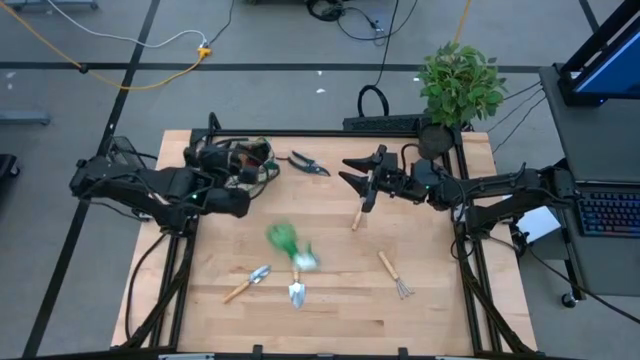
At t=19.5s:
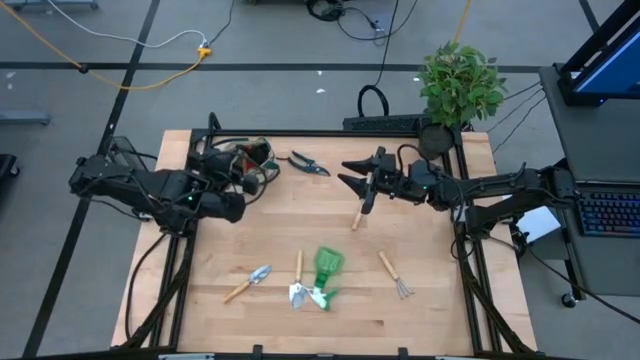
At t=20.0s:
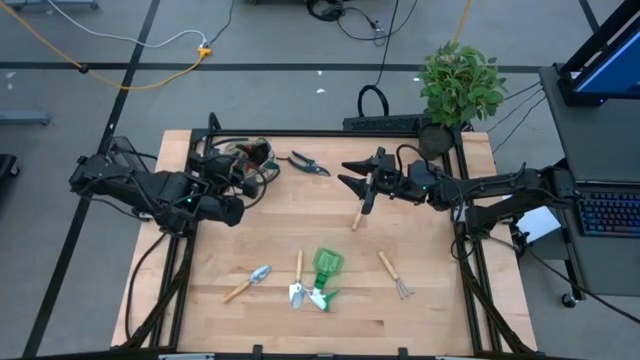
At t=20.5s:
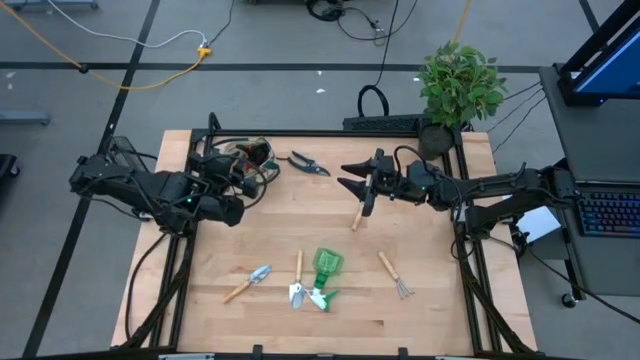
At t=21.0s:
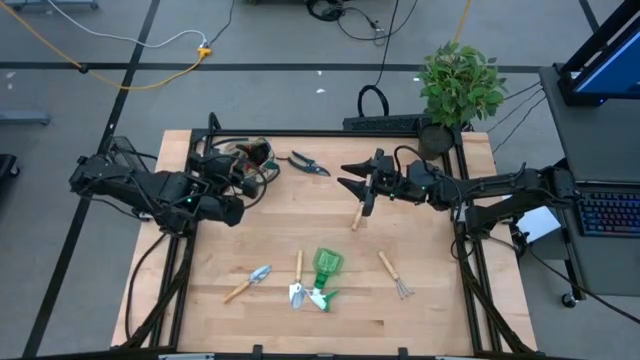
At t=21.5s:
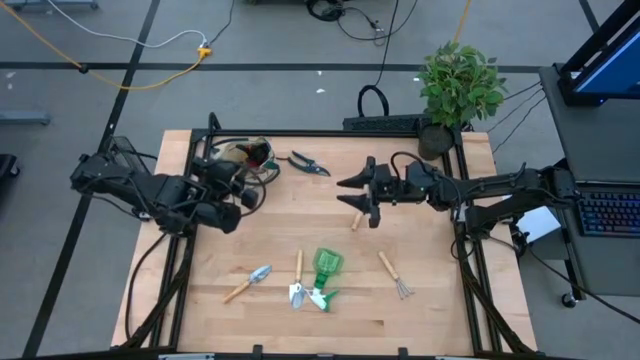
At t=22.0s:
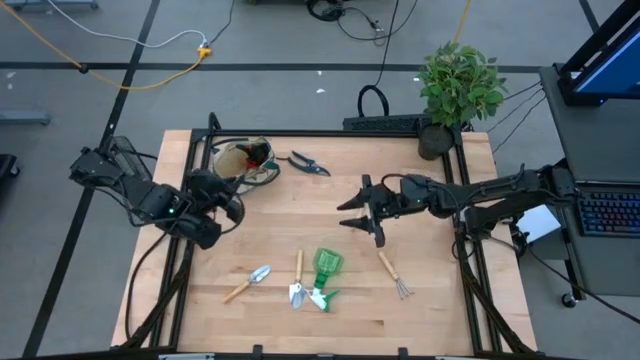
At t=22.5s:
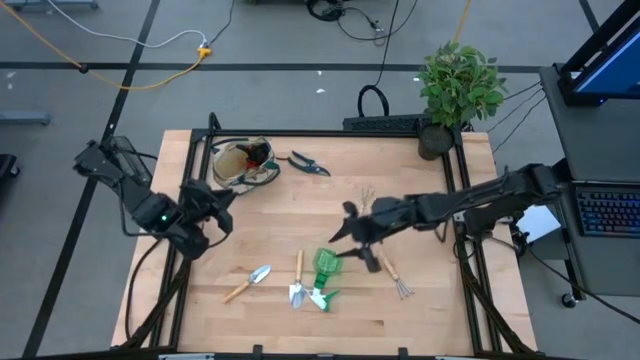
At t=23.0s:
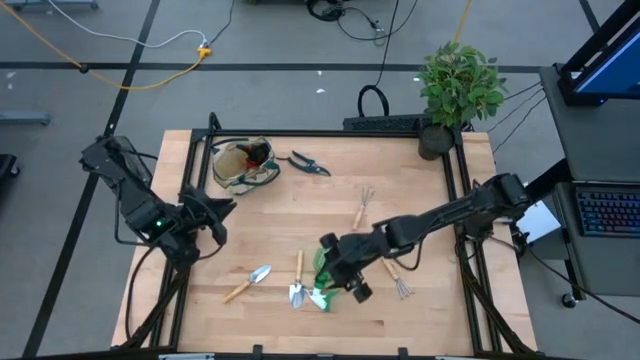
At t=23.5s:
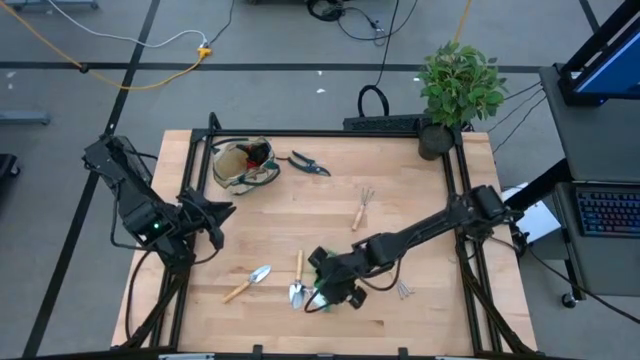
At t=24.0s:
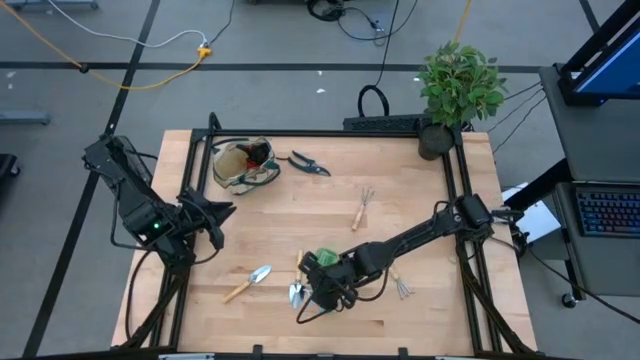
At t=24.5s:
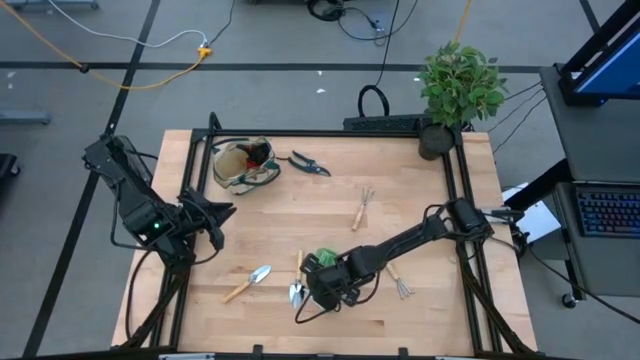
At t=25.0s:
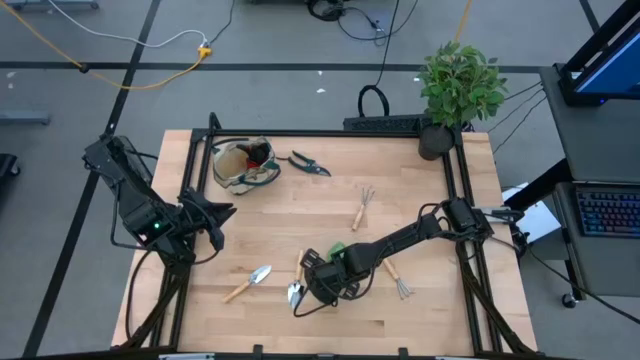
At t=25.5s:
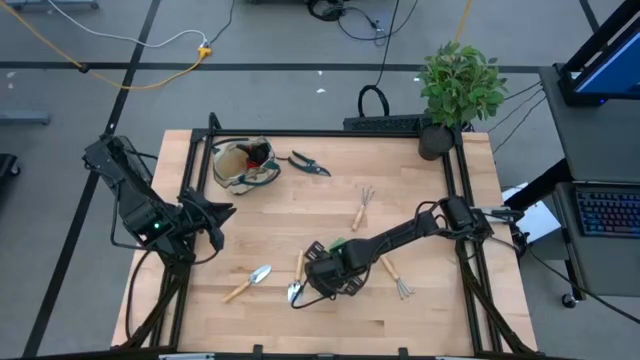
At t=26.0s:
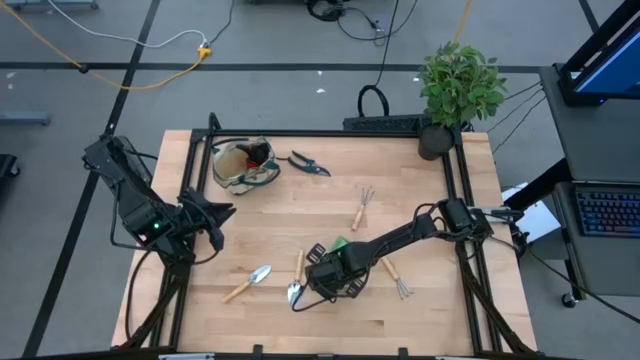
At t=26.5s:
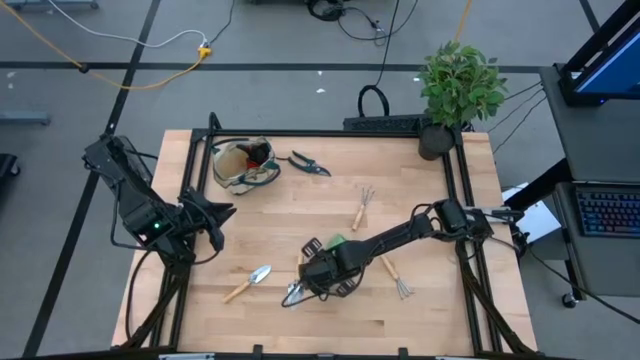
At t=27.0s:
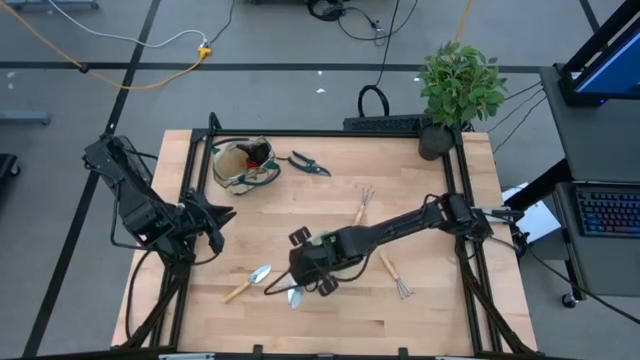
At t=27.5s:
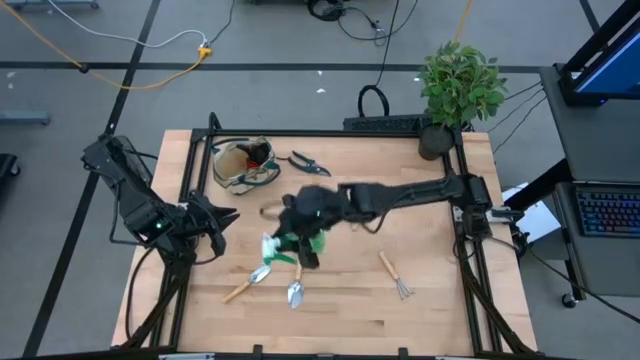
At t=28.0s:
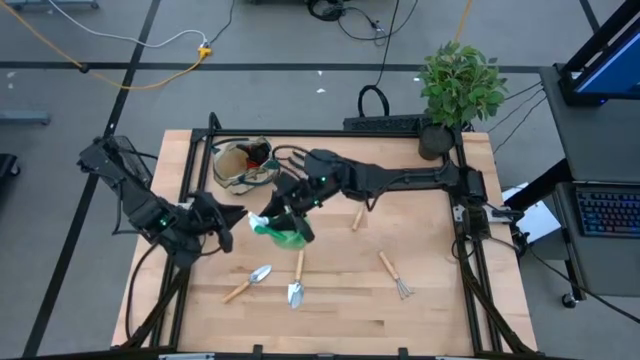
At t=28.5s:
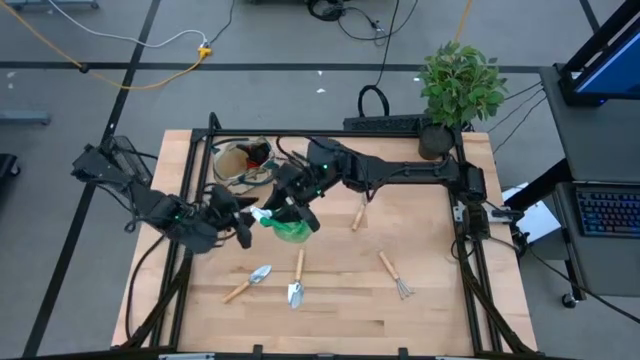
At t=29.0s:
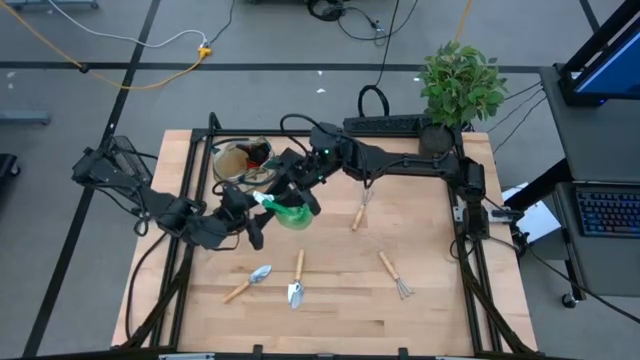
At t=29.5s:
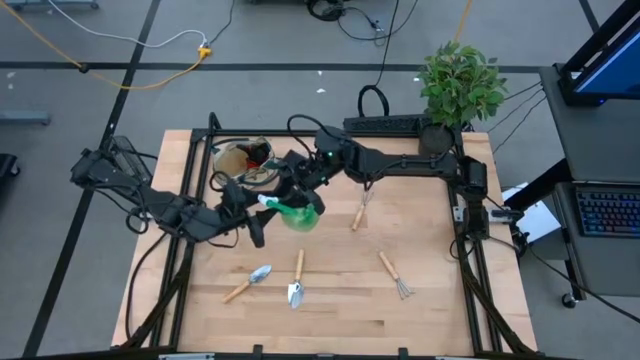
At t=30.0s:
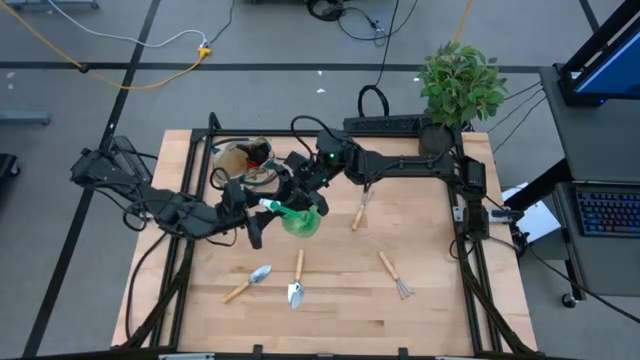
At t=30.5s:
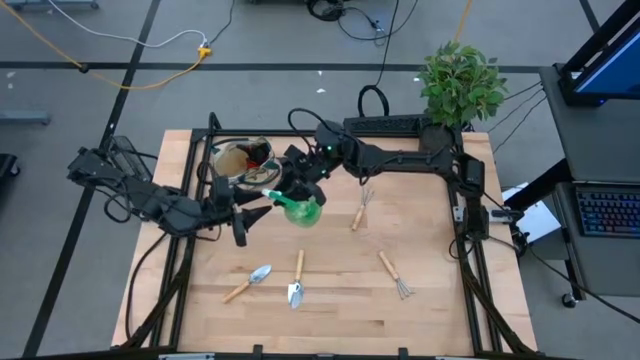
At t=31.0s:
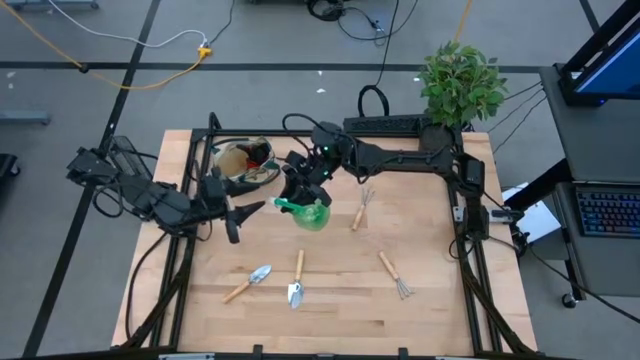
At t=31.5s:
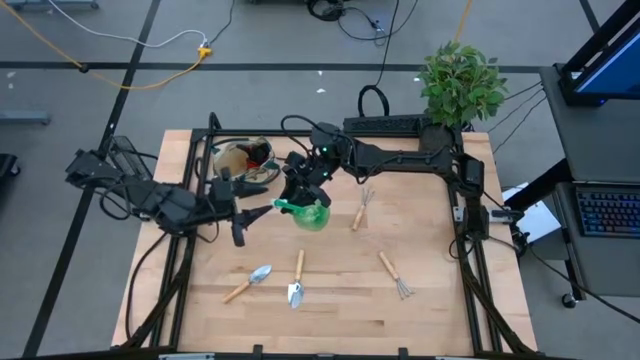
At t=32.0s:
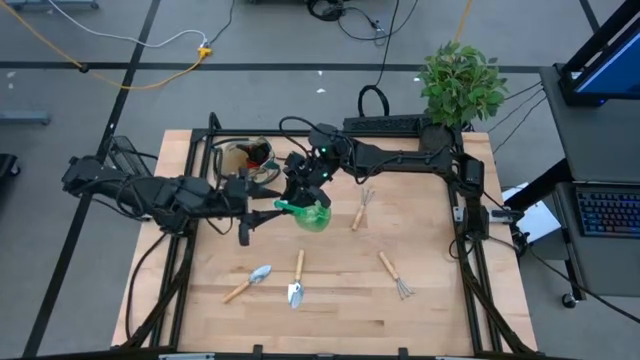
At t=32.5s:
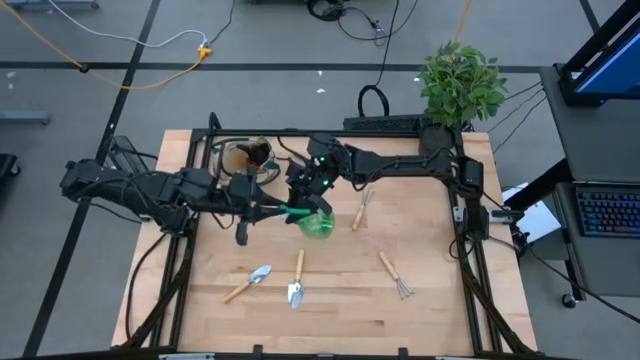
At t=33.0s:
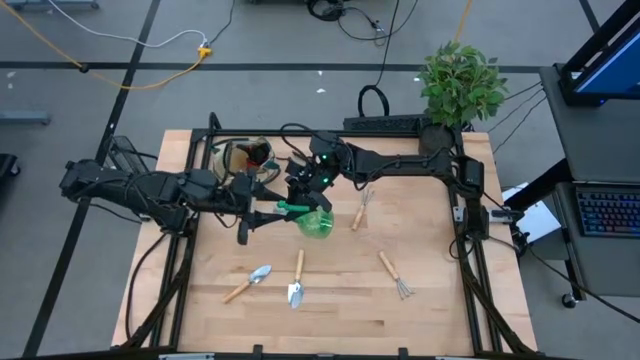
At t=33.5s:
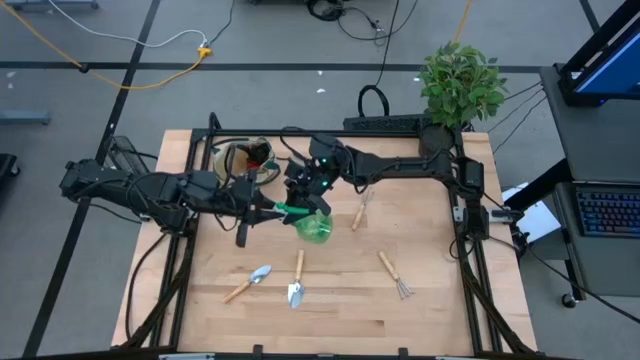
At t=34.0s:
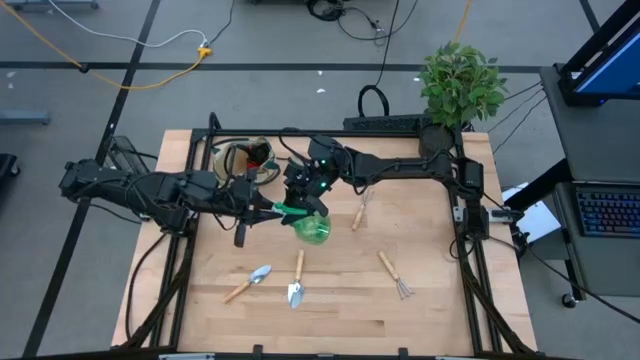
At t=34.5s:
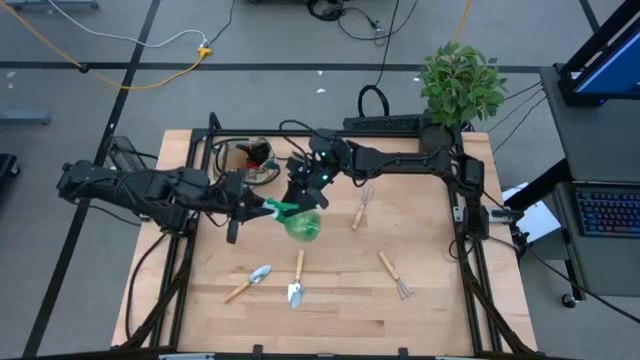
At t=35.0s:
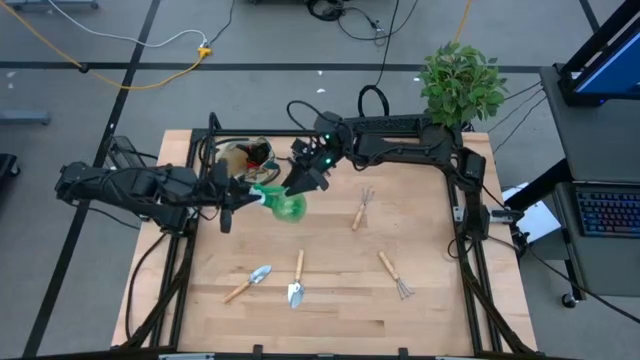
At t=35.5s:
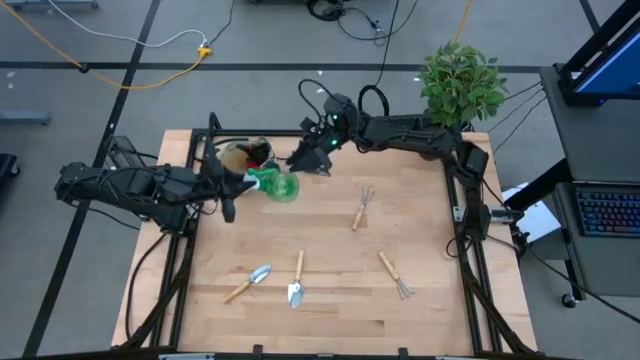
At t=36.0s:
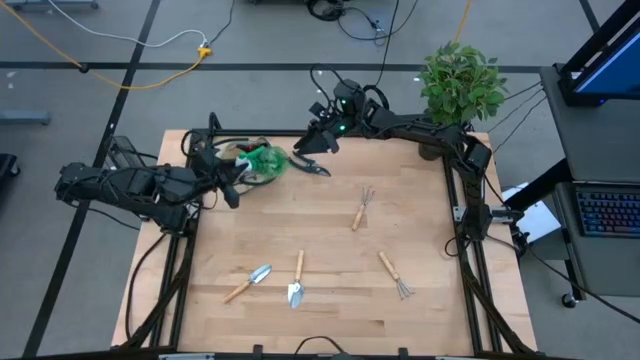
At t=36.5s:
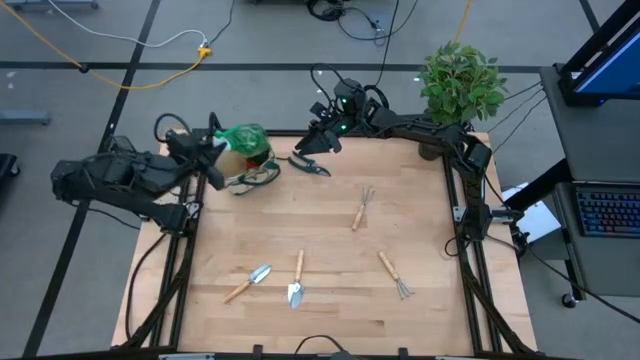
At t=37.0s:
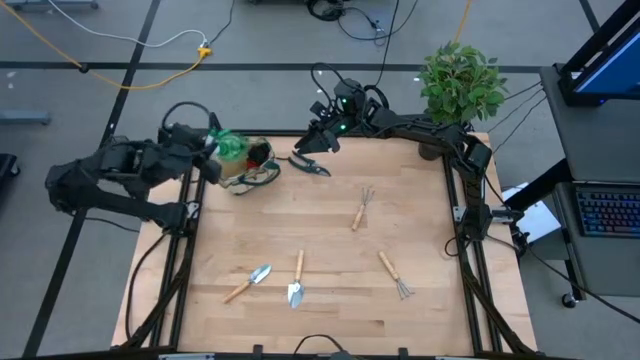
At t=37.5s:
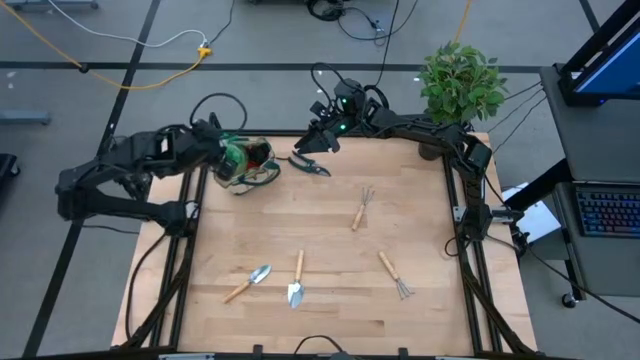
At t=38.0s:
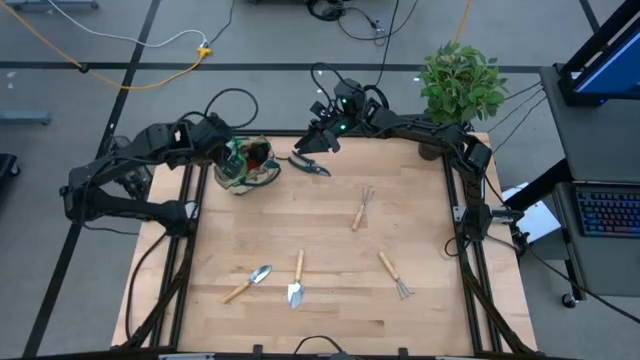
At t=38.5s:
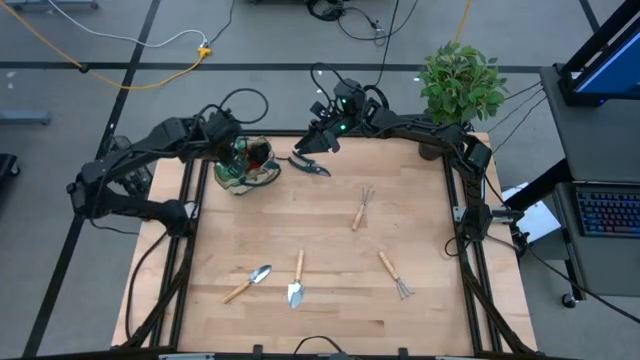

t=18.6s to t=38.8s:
Task: Pick & Place Garden tools in Gardening bag
Put the green spray bottle into the gardening bag
